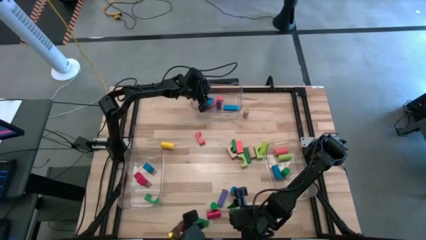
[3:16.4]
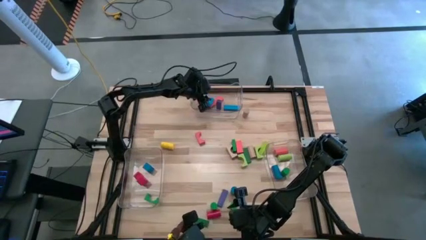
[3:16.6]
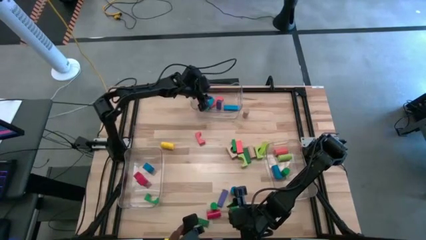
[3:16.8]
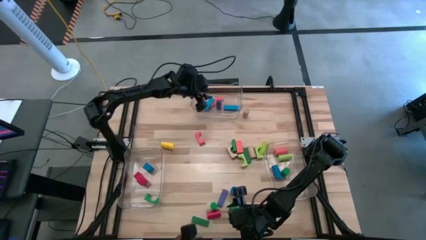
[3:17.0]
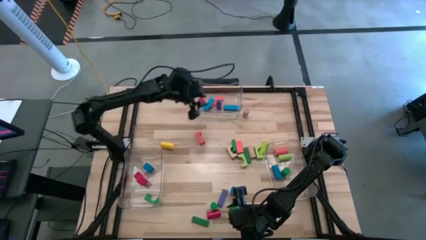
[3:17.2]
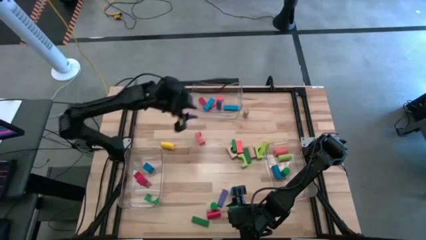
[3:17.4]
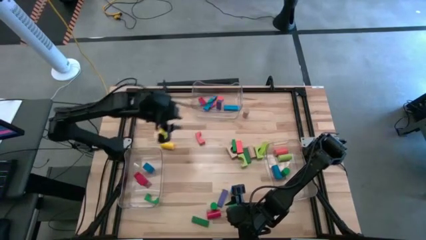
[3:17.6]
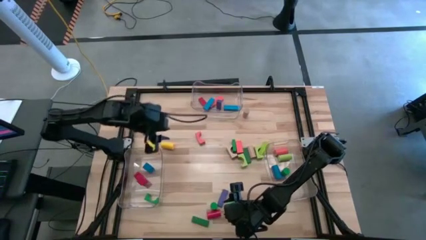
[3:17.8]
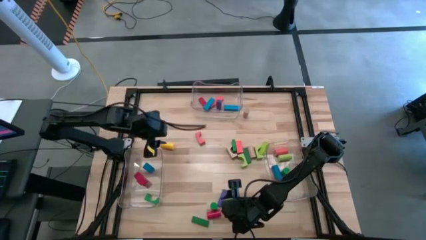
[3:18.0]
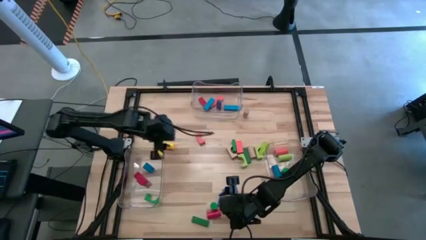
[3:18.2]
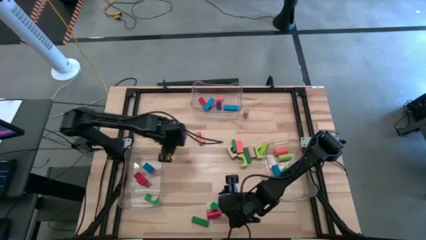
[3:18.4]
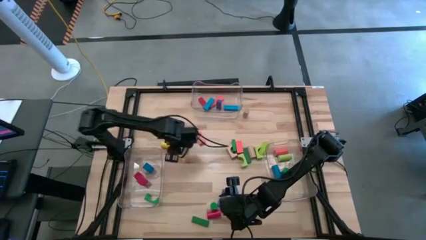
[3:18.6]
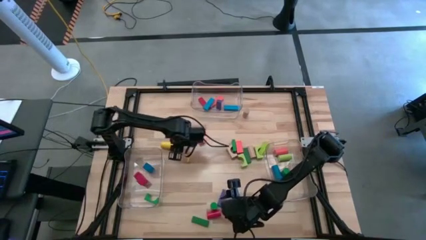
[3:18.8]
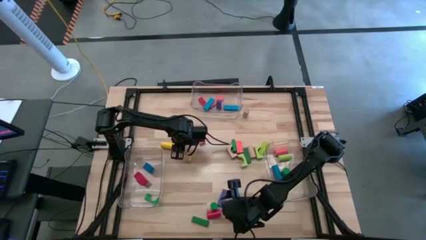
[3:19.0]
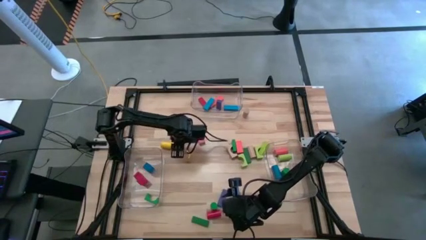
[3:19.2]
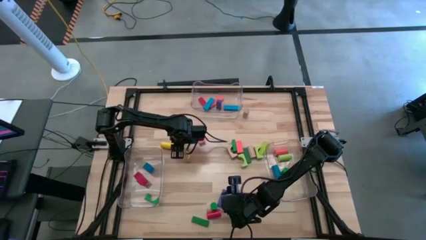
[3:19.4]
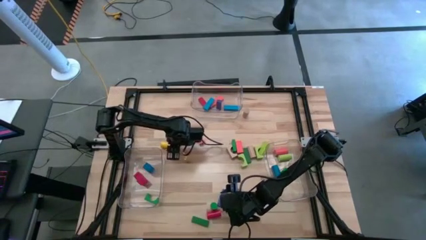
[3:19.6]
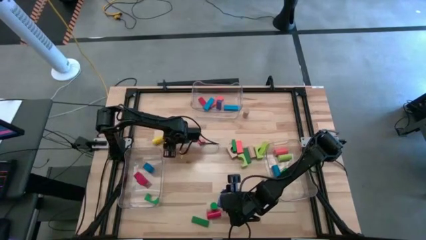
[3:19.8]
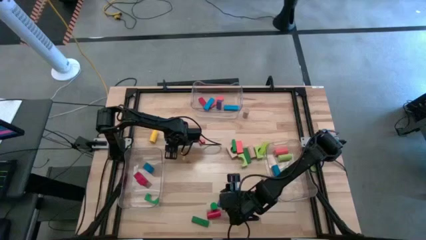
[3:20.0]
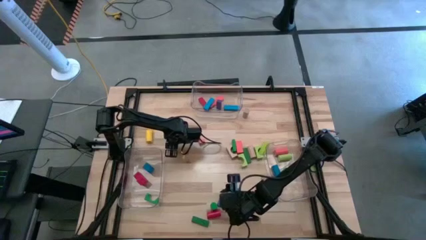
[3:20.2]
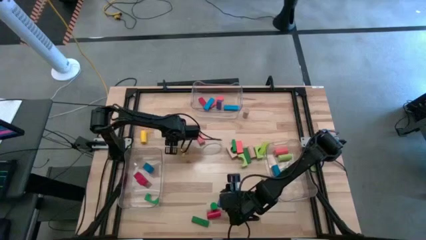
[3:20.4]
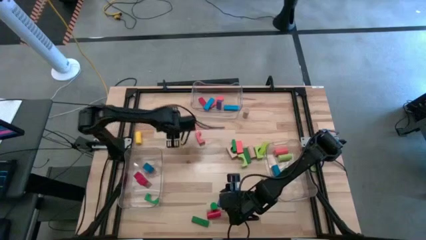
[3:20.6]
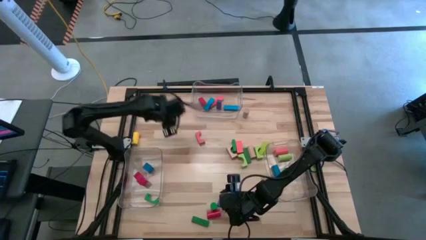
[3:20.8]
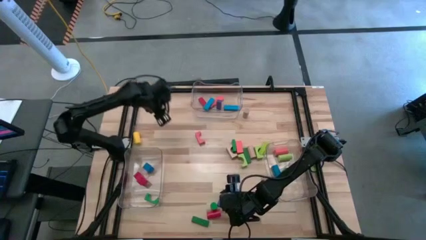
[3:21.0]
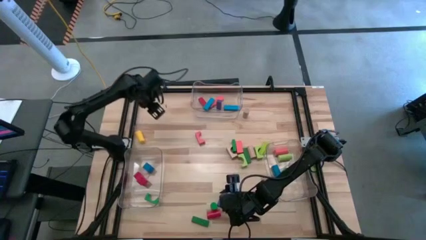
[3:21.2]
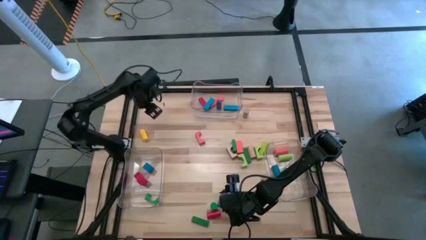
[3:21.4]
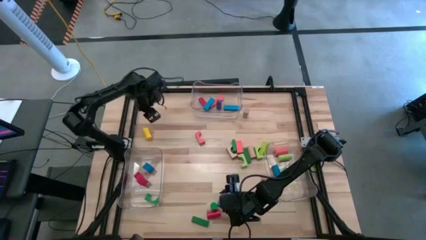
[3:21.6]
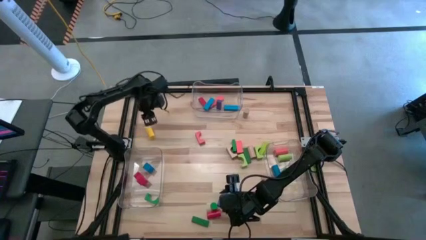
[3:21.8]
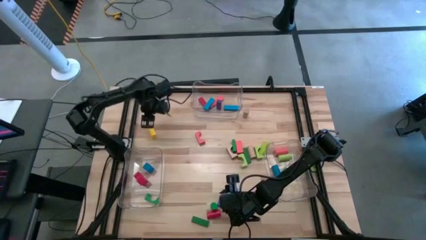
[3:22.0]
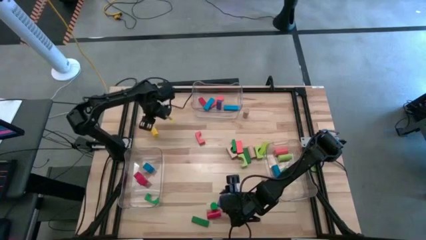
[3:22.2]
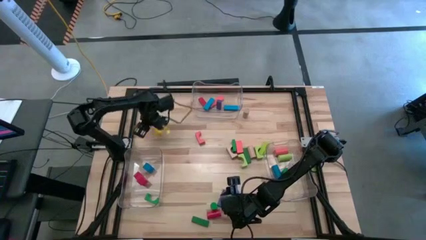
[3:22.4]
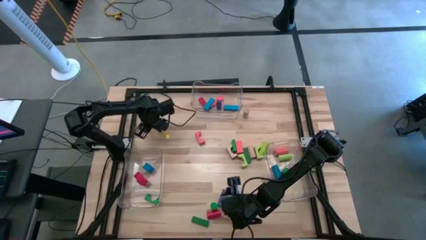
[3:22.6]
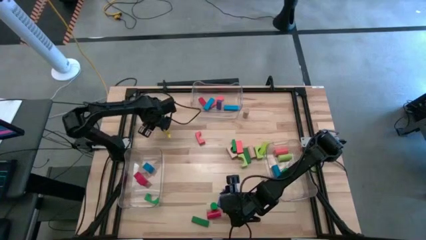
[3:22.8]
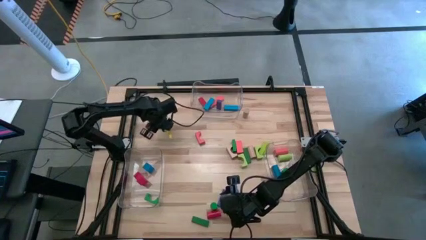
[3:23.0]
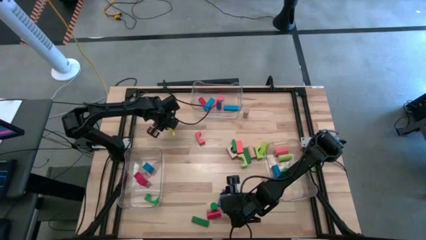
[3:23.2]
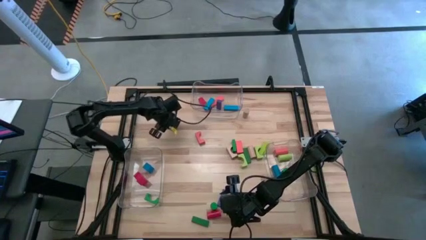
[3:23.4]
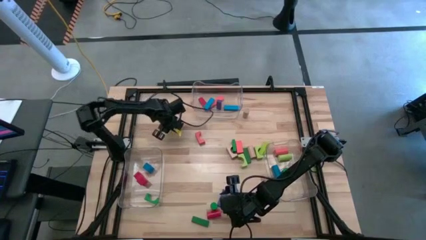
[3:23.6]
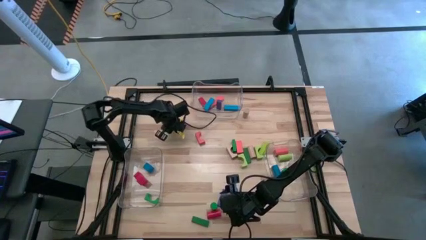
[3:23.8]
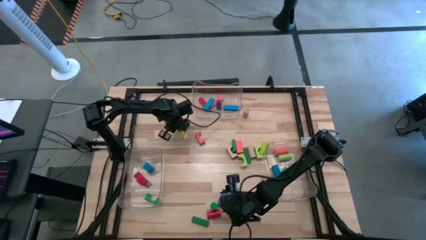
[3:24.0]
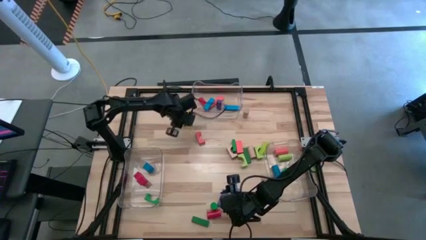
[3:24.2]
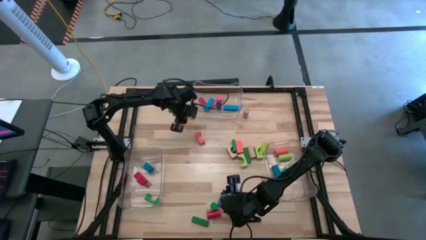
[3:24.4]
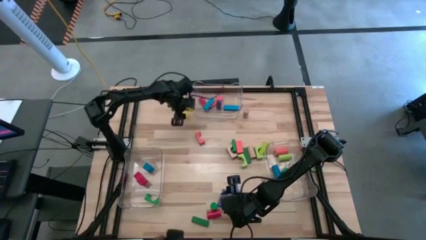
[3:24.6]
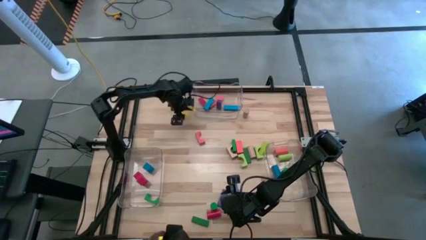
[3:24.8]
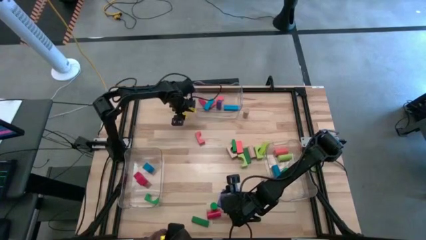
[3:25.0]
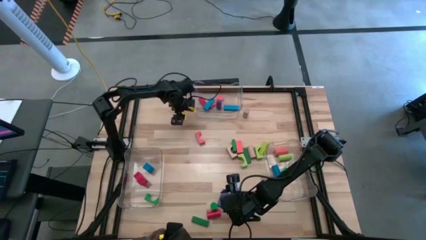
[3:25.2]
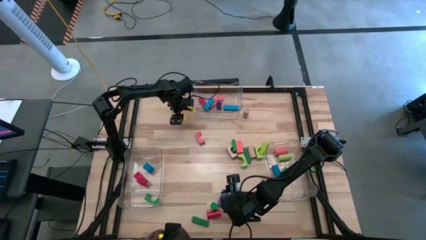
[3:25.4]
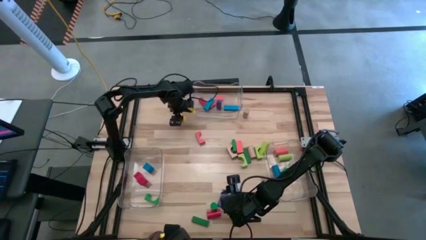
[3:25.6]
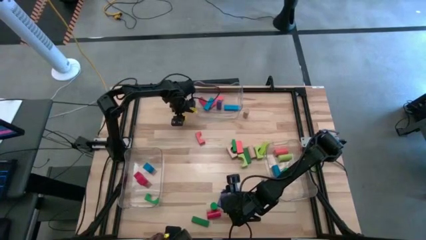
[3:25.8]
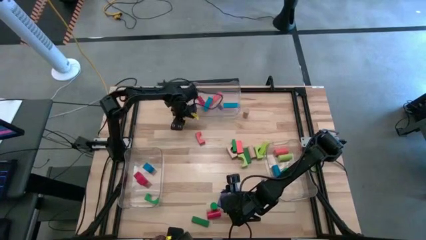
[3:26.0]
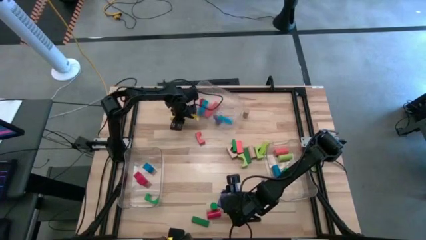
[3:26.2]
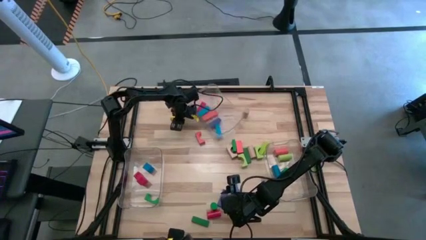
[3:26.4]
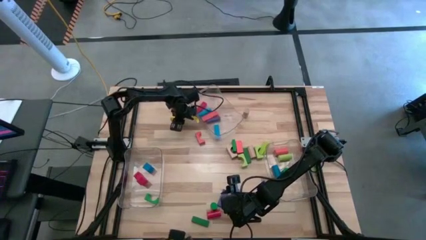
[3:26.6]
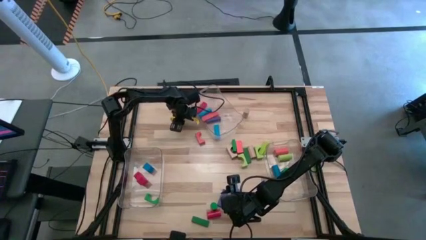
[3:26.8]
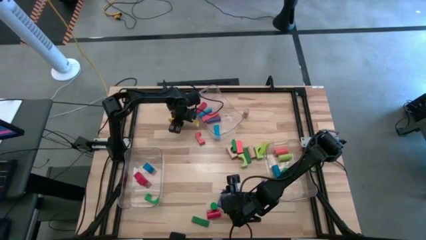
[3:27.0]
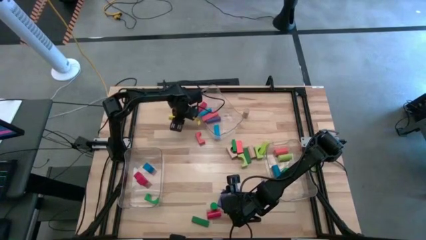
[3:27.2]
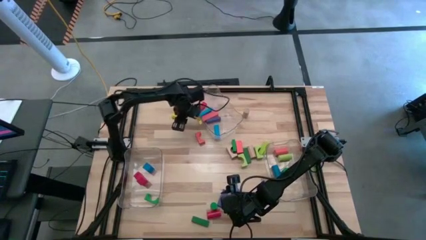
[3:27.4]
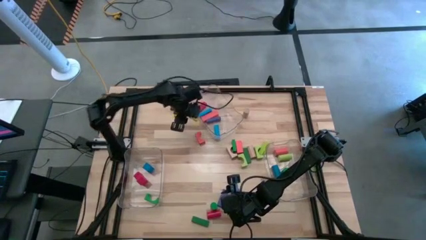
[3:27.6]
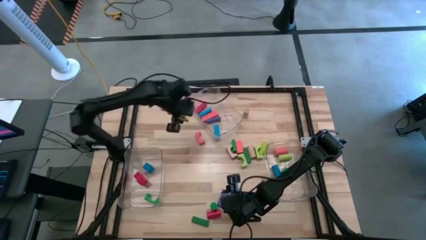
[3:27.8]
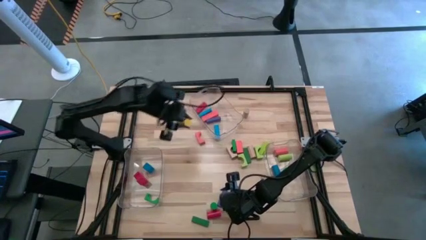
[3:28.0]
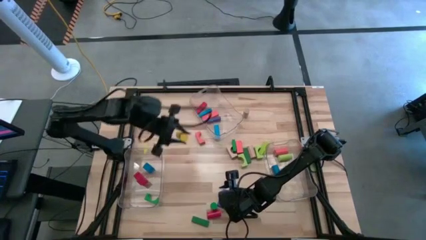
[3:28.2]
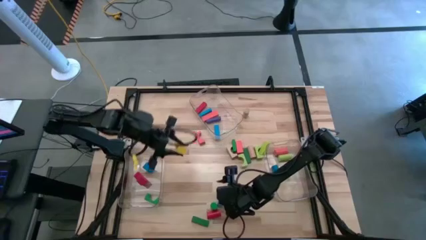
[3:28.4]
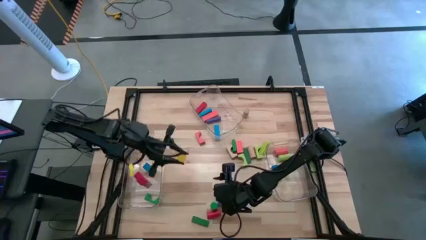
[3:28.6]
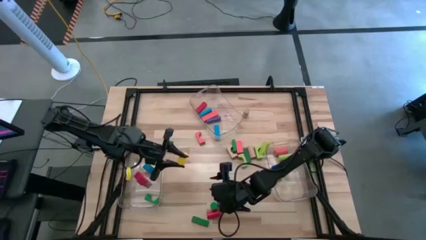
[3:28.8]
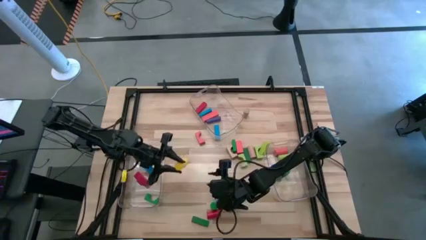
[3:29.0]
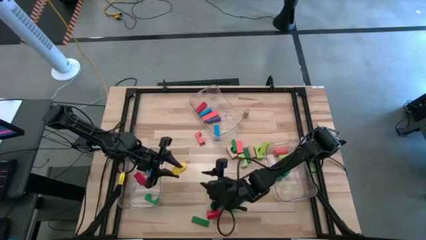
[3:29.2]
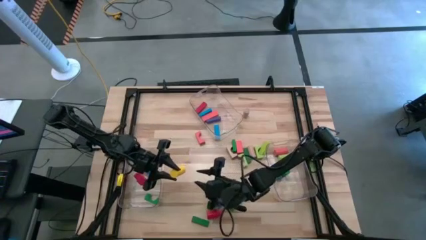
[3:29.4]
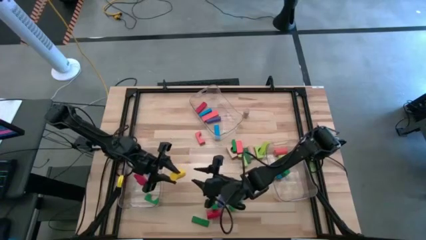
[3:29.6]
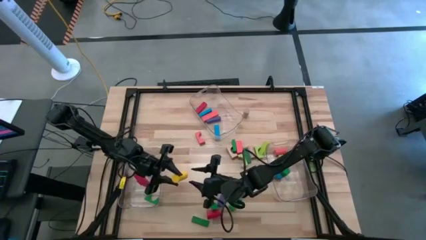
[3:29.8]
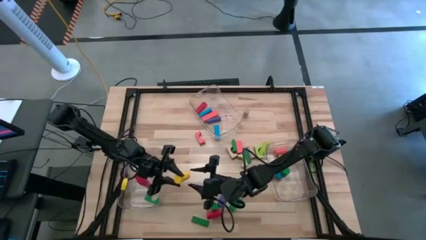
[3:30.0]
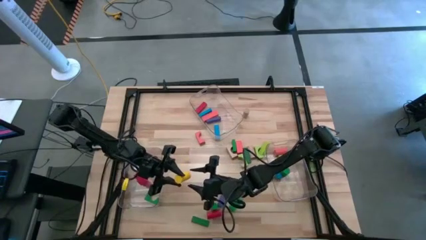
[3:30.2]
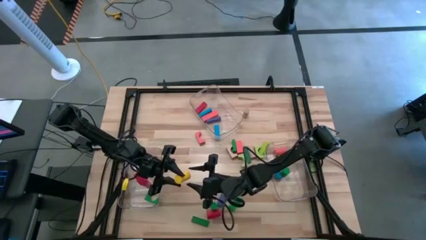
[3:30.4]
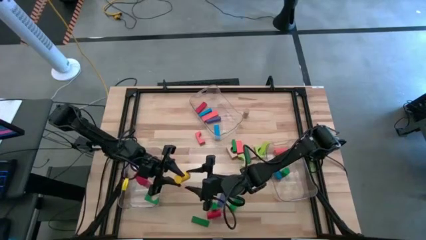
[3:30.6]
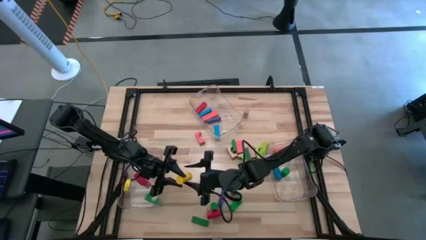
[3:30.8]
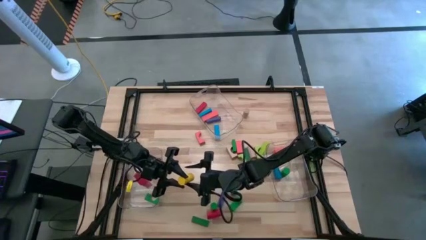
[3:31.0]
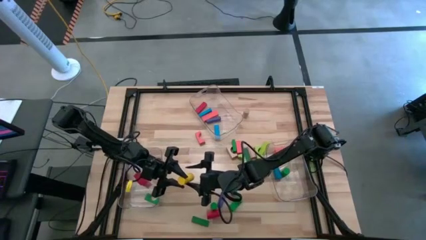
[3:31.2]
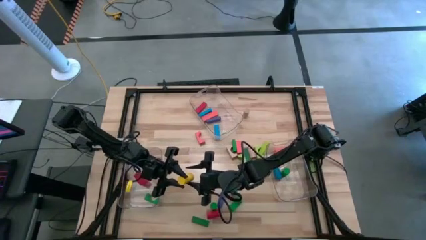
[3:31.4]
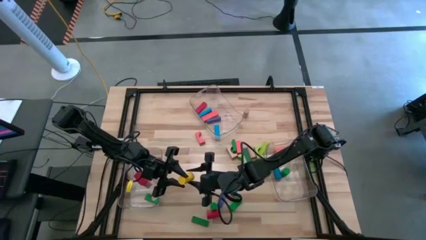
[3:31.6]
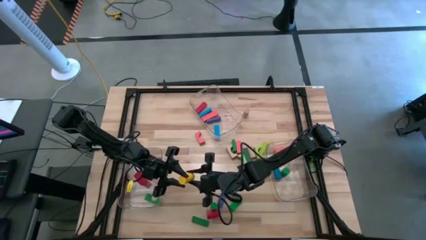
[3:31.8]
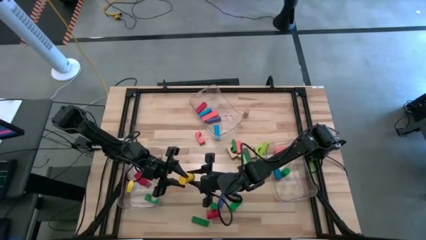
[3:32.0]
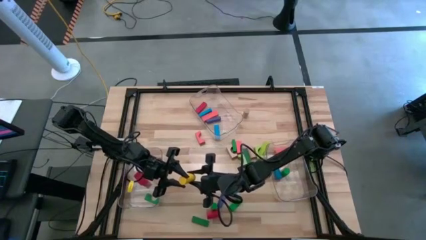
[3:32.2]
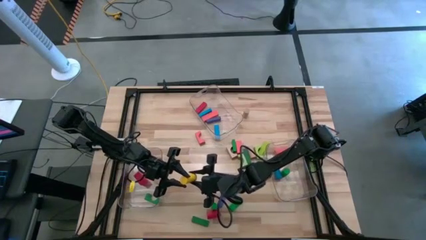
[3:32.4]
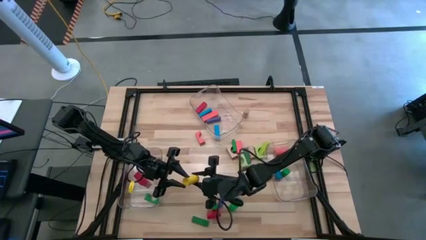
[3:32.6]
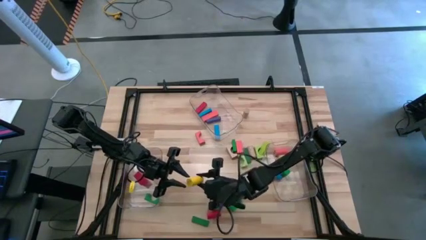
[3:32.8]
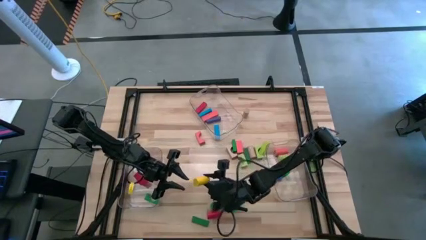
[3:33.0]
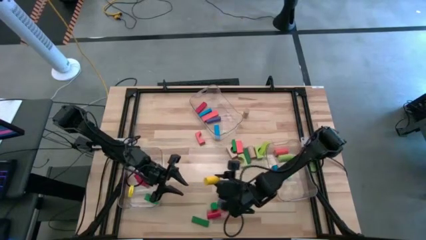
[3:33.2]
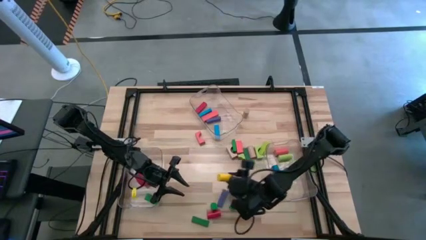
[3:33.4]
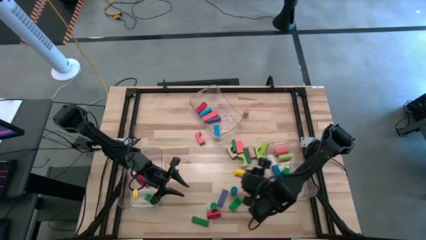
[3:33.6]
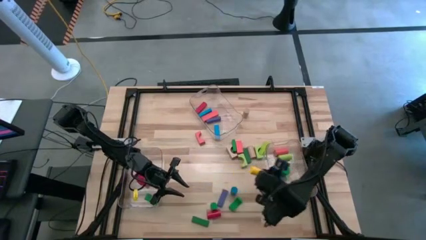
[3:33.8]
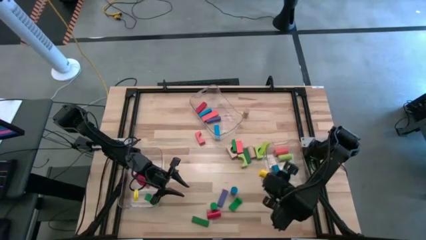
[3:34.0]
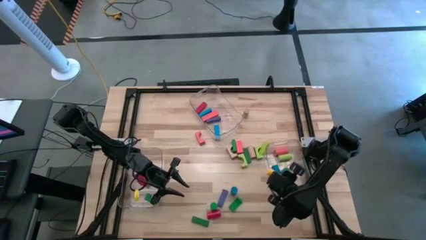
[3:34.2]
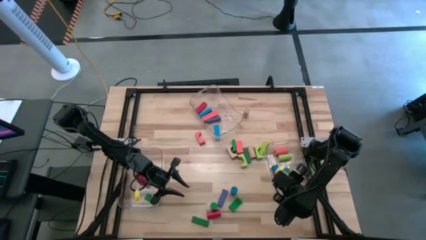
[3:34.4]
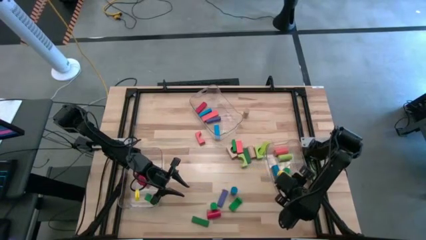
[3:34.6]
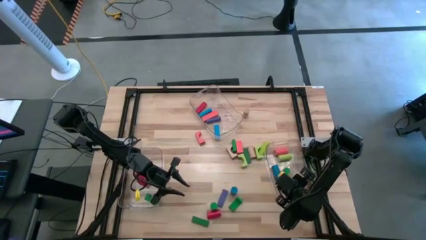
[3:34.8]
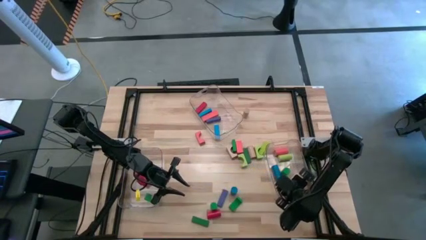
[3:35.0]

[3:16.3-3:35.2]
Task: Sort blocks by size
Put the yellow cylindrical block into the right transparent bin
